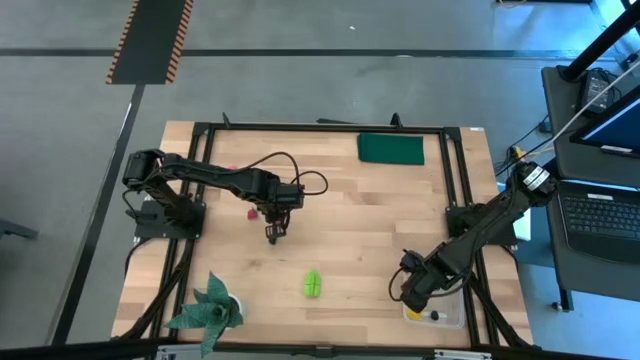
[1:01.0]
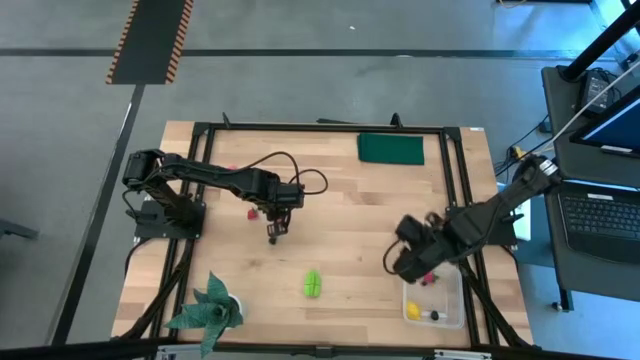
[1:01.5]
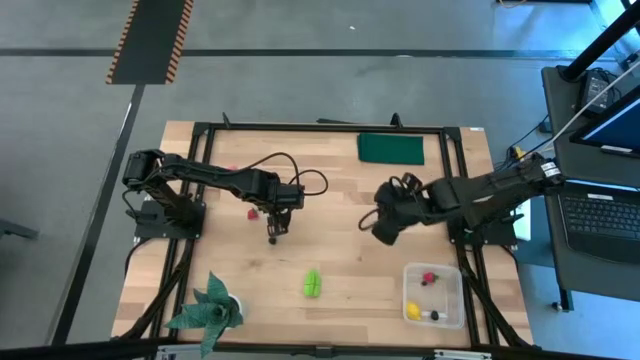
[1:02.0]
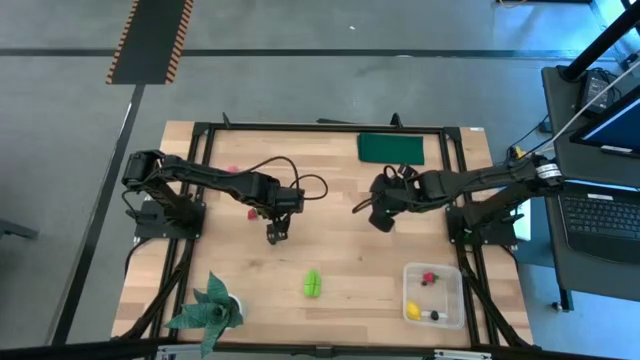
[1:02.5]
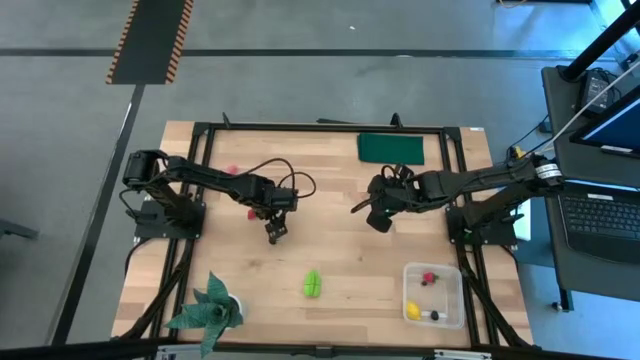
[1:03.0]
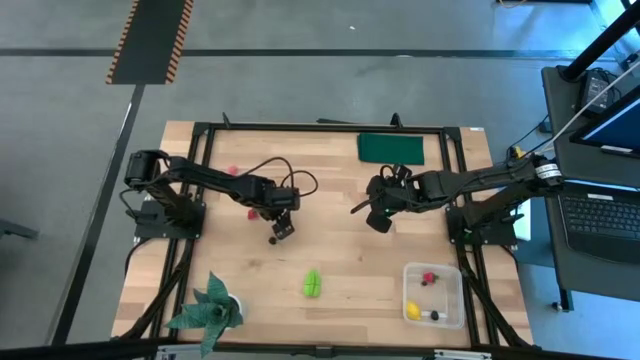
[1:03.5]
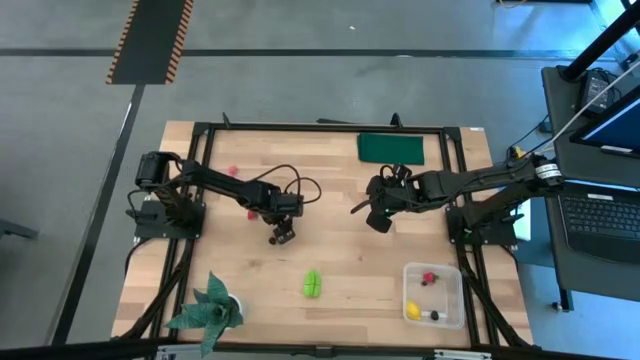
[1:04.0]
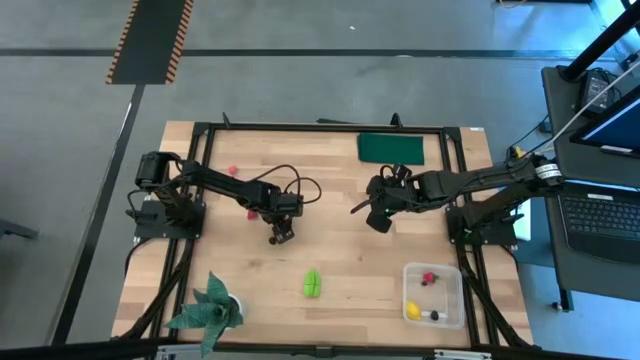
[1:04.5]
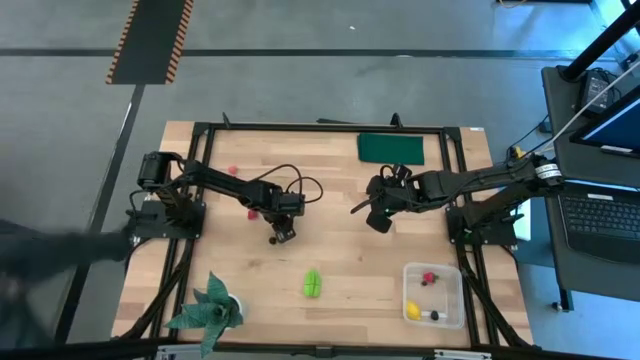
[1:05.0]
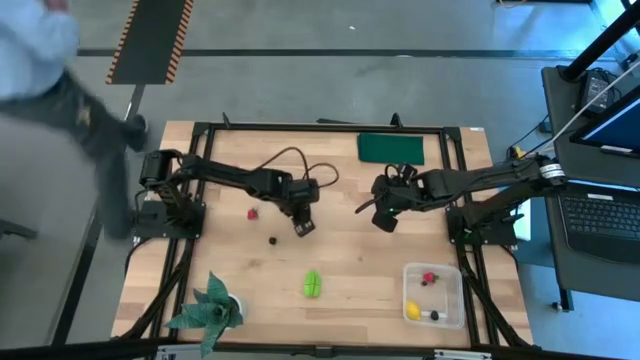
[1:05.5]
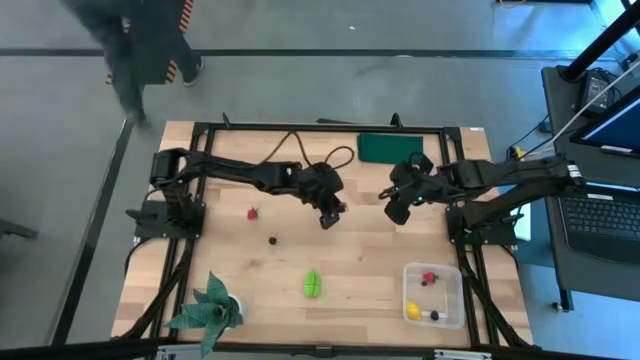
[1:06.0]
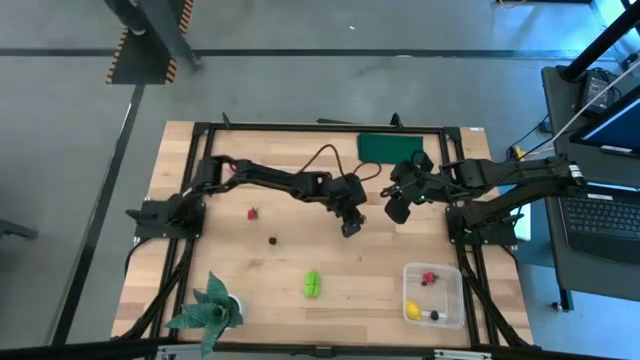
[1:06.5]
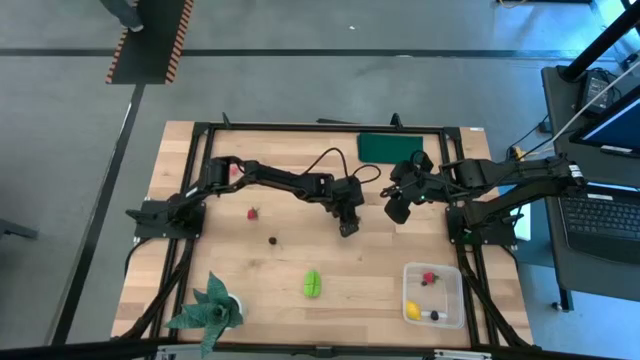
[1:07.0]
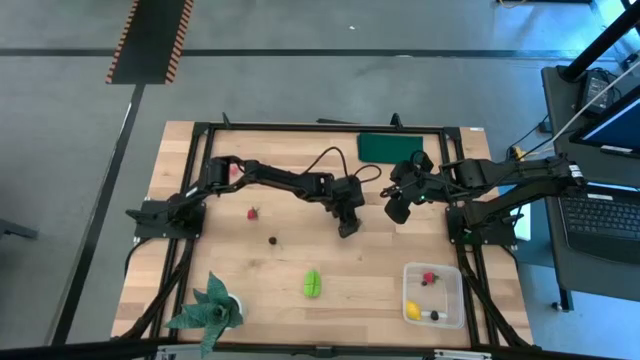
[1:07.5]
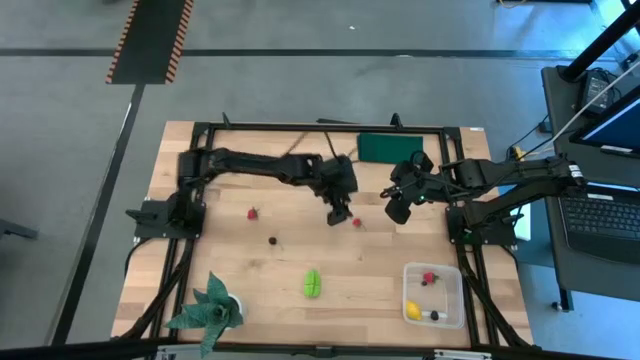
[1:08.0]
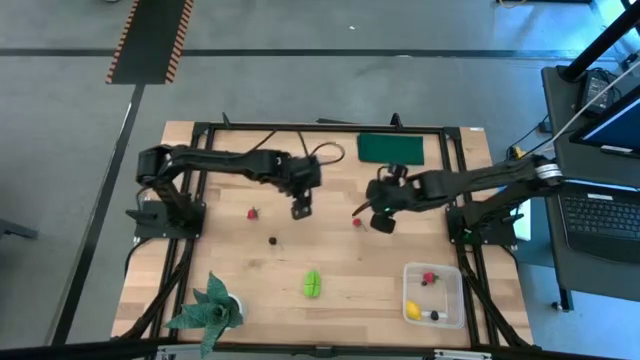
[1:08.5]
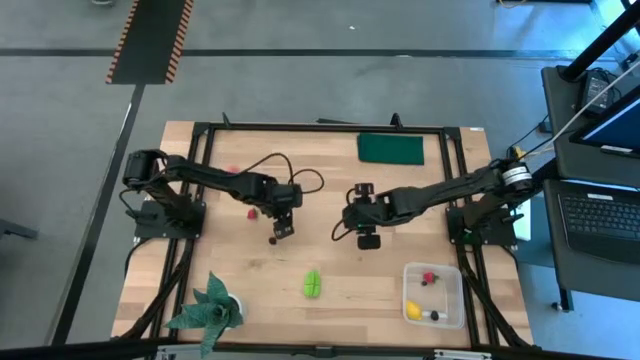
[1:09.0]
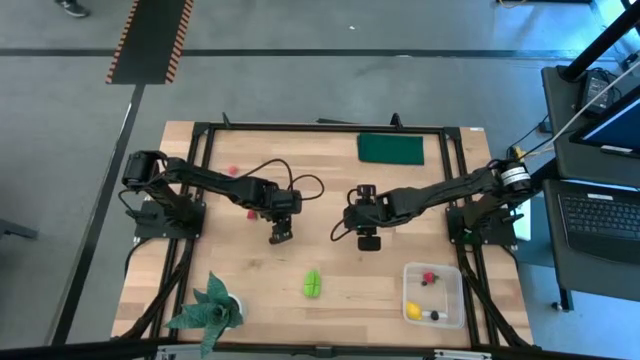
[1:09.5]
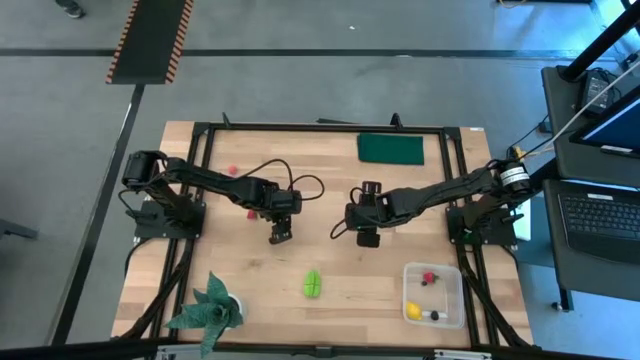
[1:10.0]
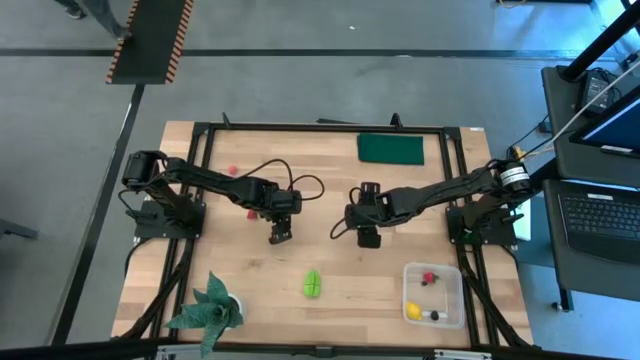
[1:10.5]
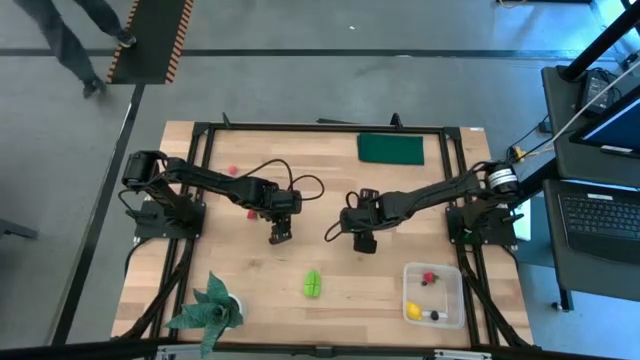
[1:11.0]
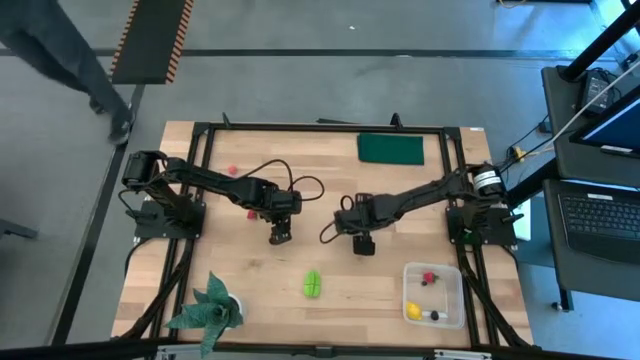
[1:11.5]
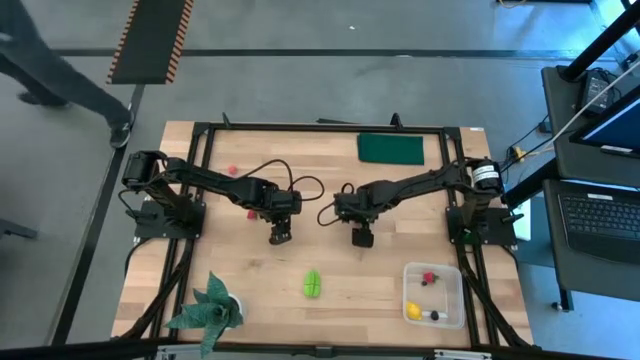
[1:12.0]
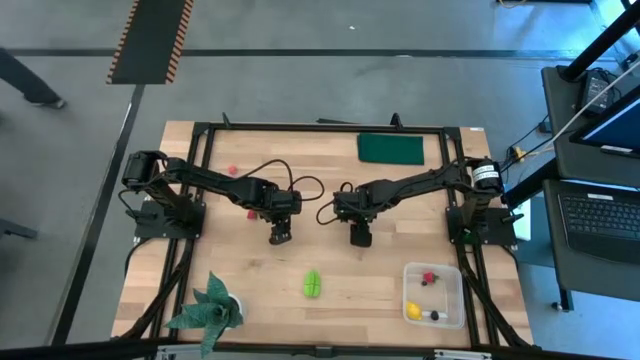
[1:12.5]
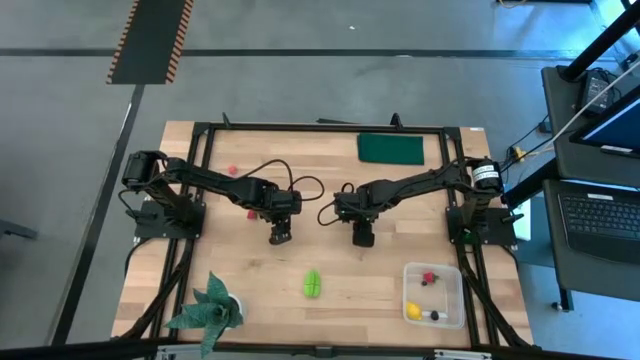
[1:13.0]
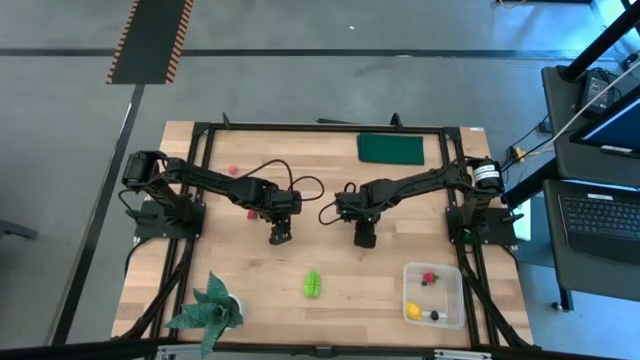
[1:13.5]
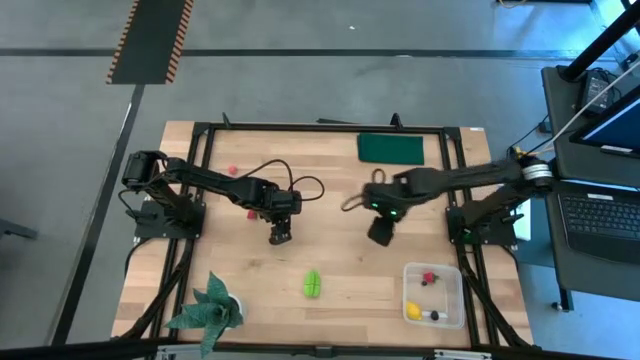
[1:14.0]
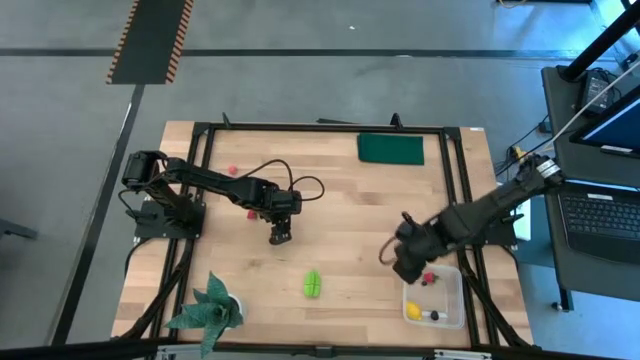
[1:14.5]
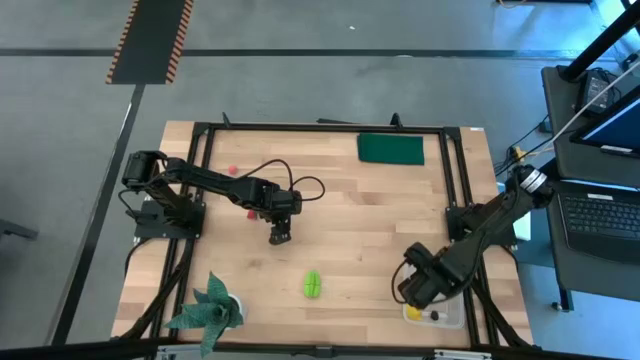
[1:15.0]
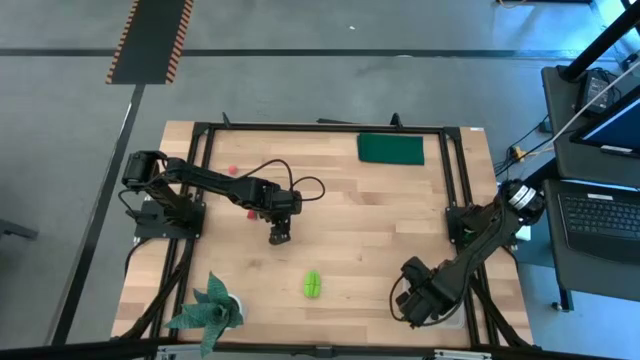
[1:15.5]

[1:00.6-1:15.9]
Task: Pick and placing Produce into tupperware
Put the red cherry into the transparent bin

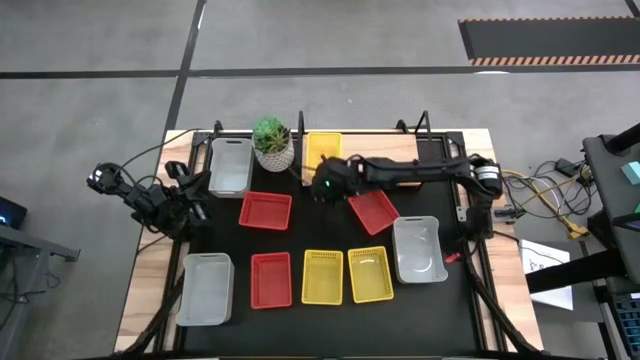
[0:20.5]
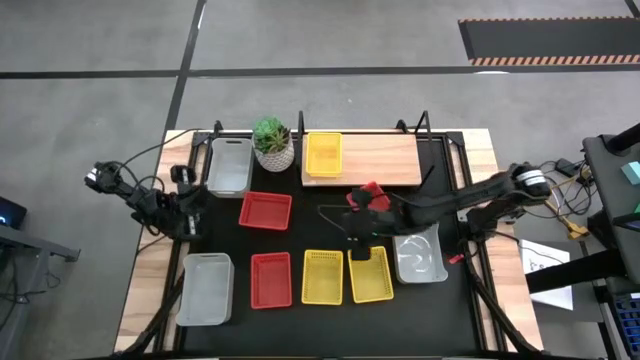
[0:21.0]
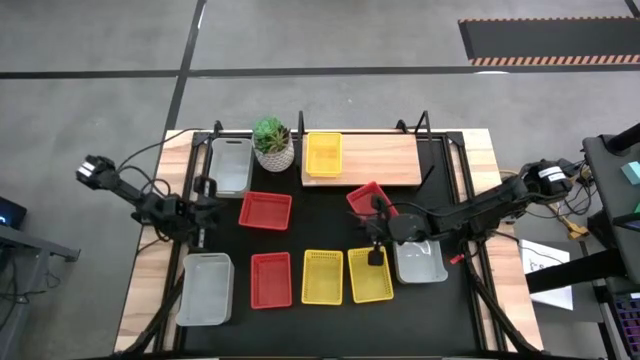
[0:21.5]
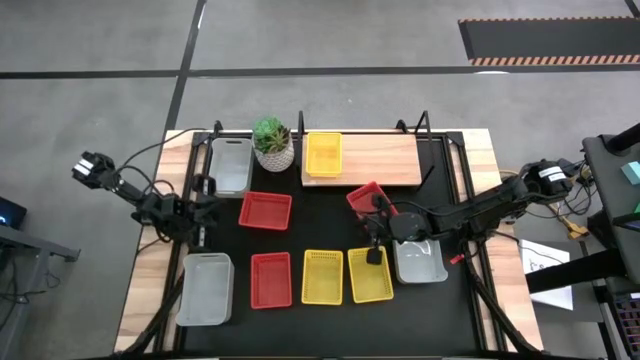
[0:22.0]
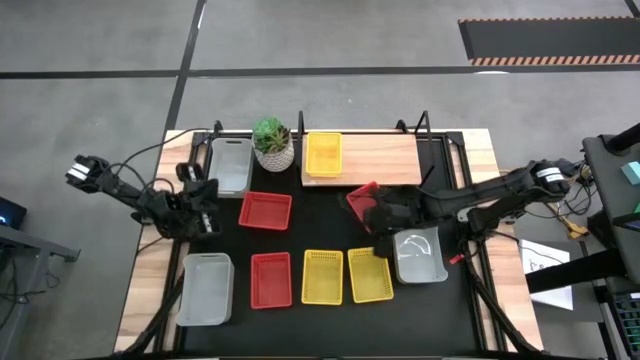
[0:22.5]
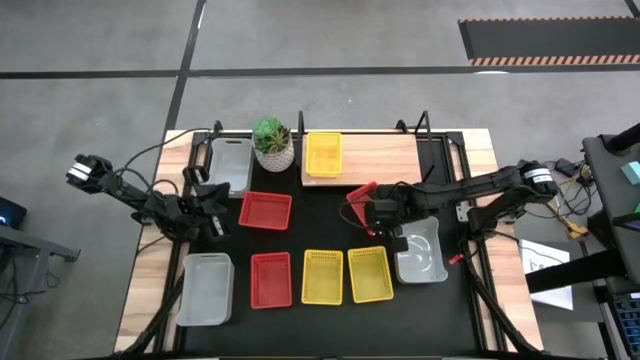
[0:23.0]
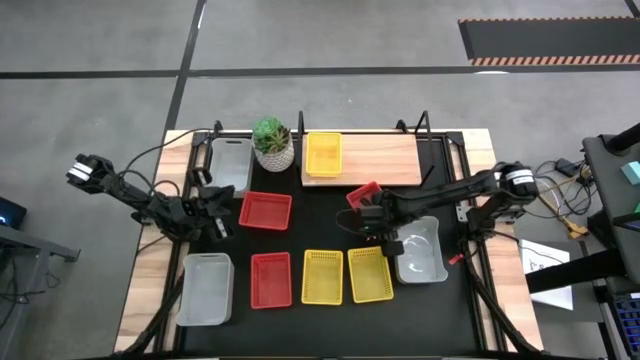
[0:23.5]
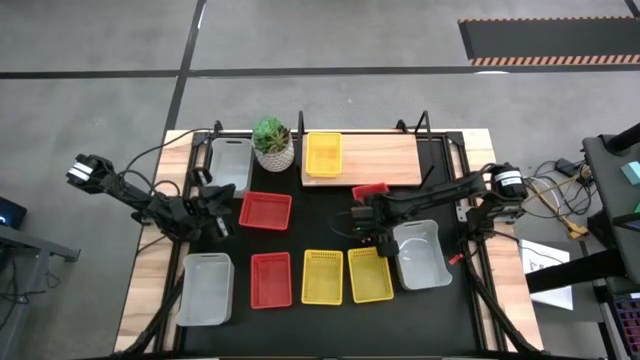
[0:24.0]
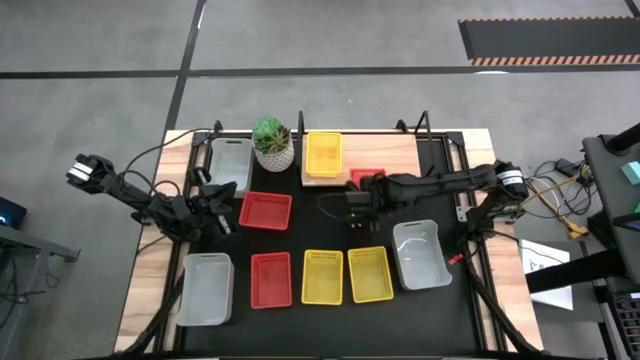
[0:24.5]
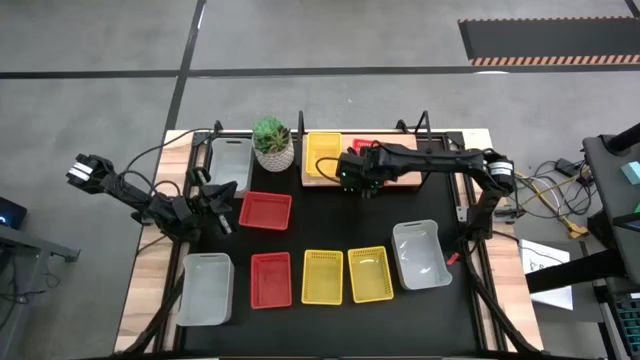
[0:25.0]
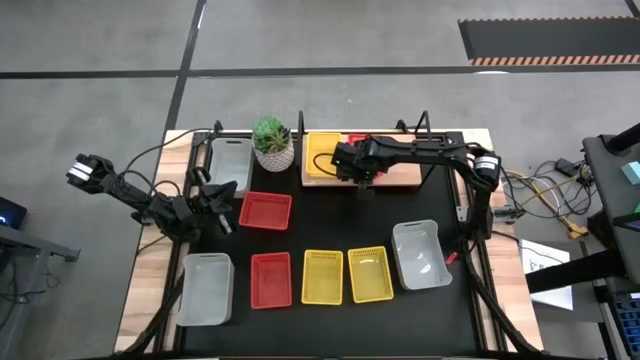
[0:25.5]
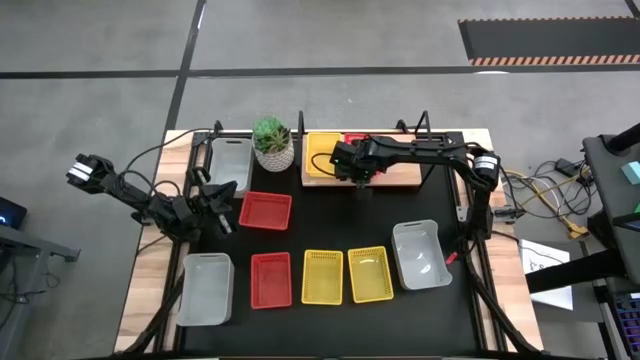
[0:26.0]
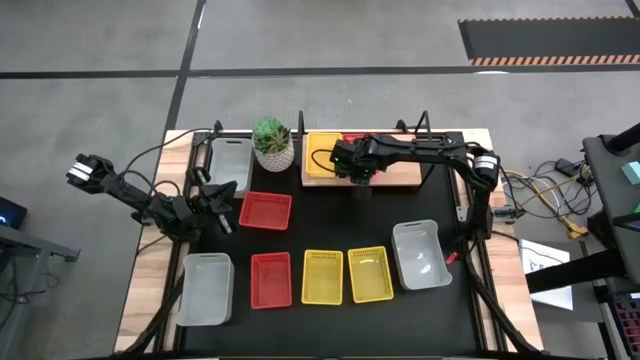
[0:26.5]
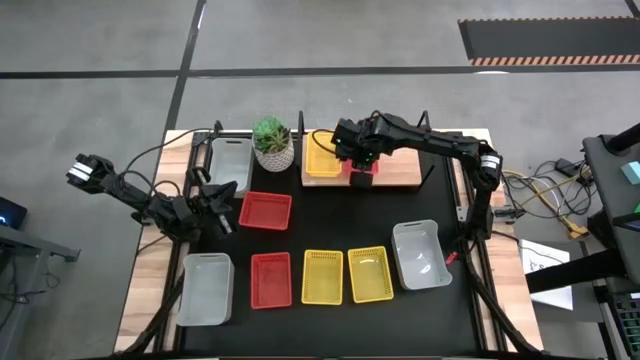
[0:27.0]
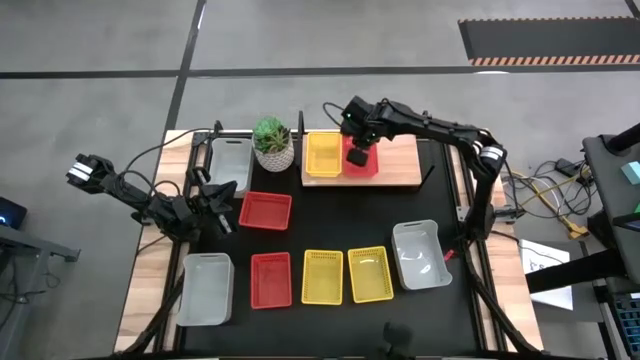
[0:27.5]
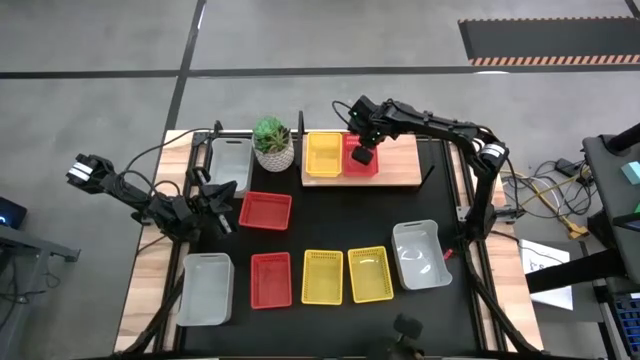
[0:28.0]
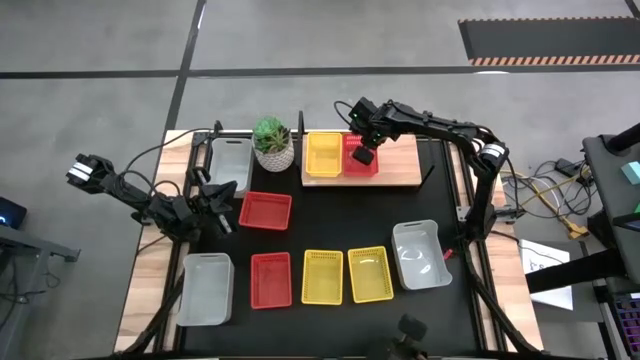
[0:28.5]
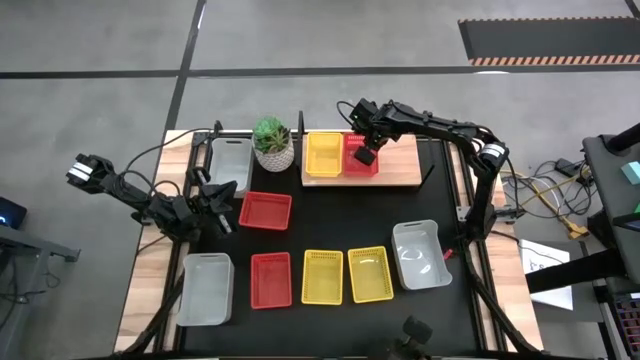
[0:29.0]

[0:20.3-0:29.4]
Task: Stack baskets on shelf by color
Put the top right red bin on the shelf
